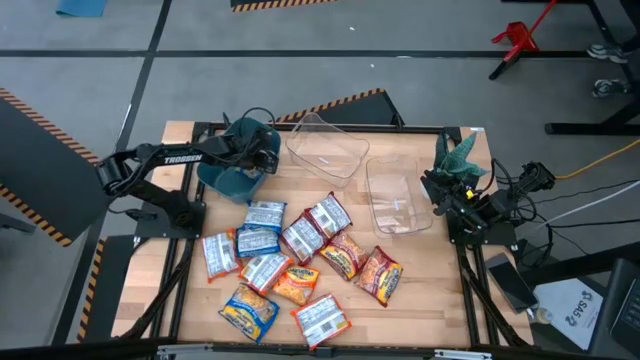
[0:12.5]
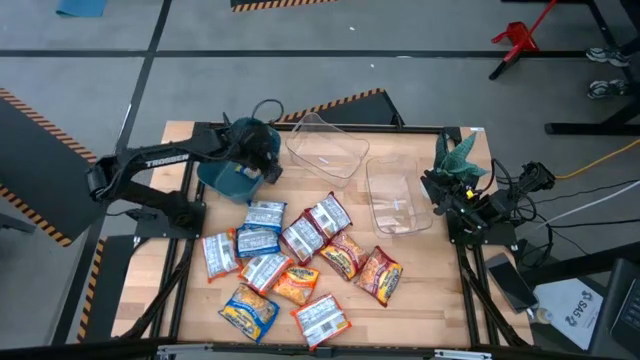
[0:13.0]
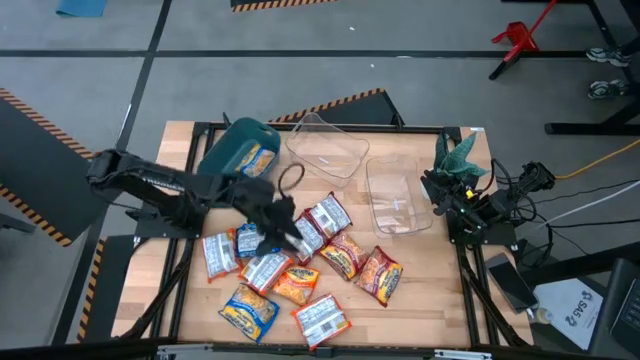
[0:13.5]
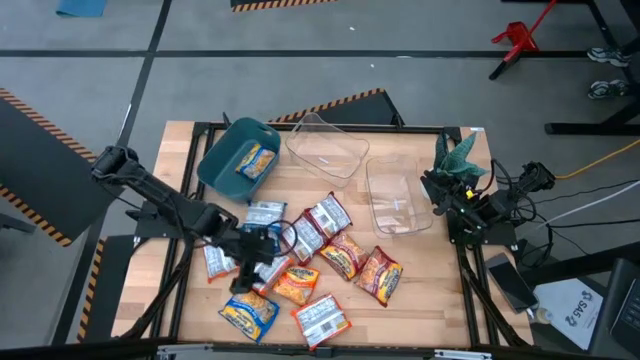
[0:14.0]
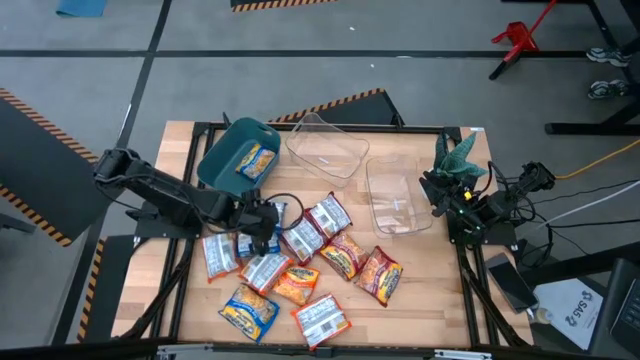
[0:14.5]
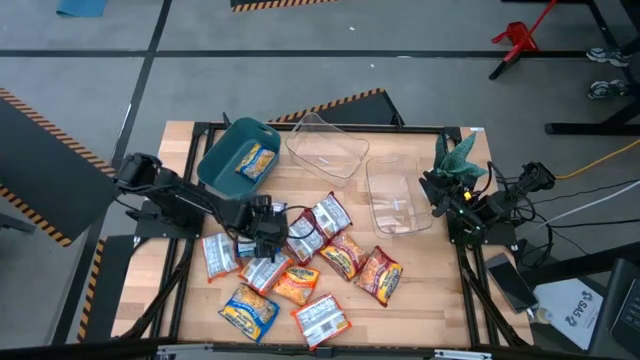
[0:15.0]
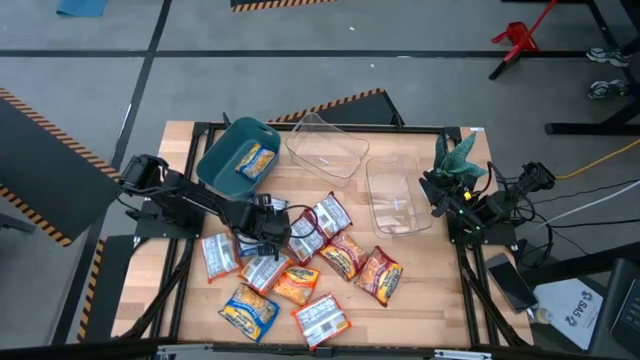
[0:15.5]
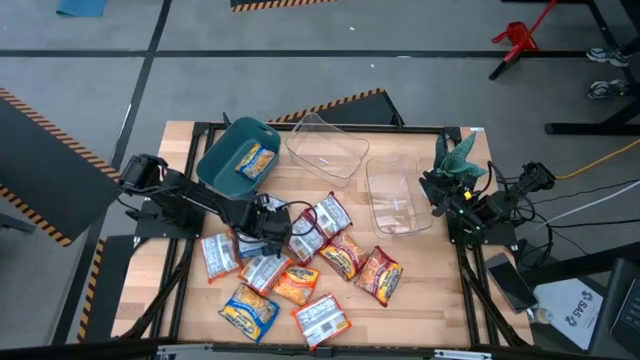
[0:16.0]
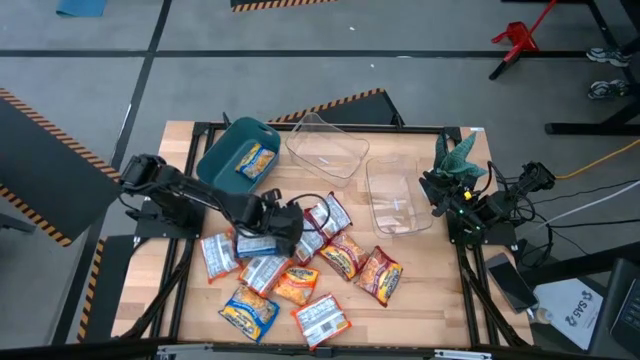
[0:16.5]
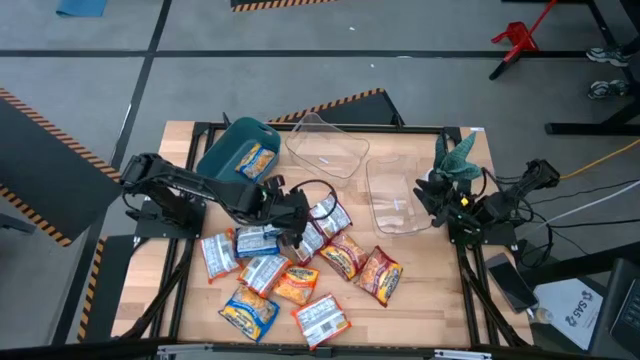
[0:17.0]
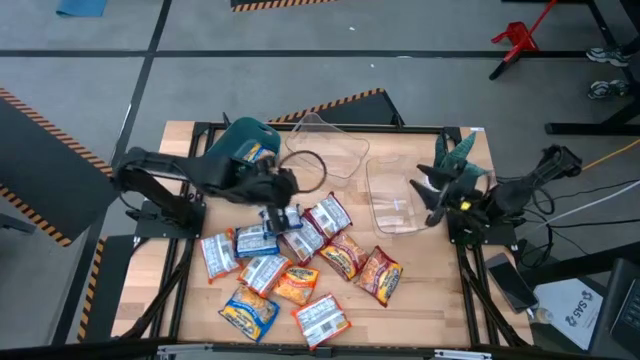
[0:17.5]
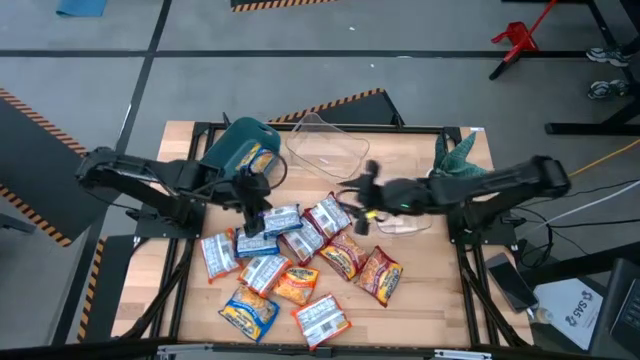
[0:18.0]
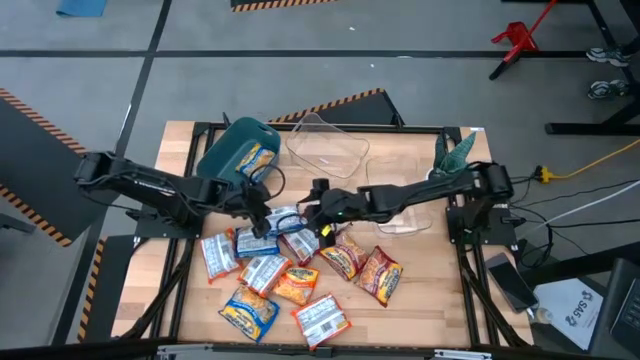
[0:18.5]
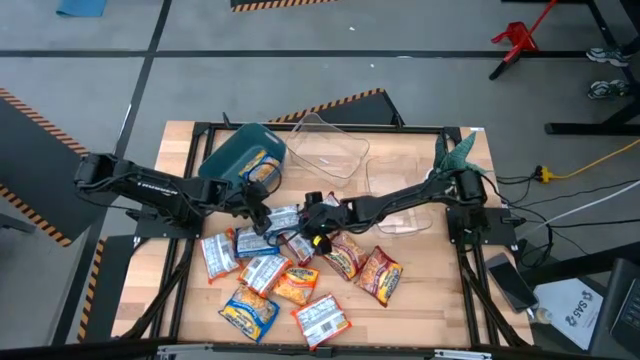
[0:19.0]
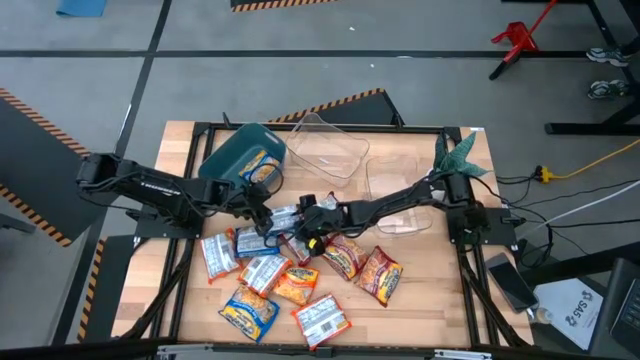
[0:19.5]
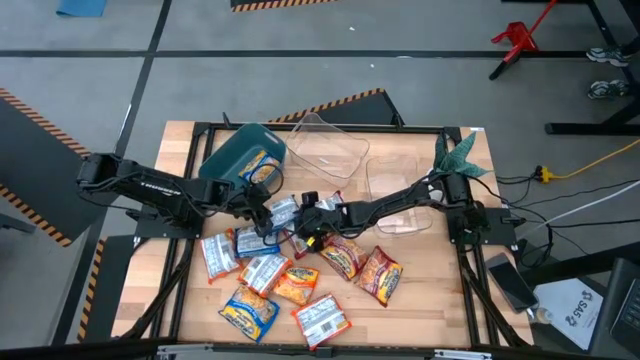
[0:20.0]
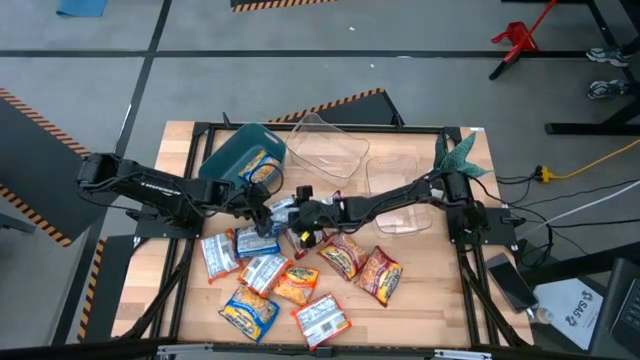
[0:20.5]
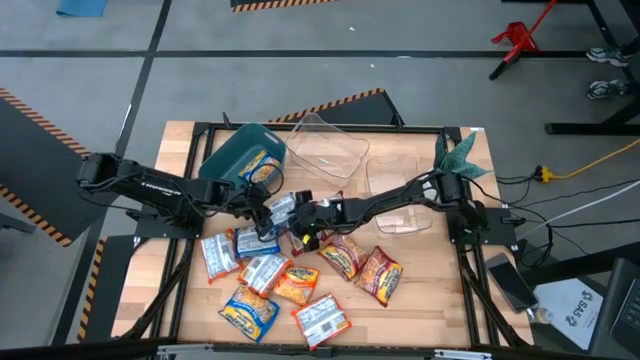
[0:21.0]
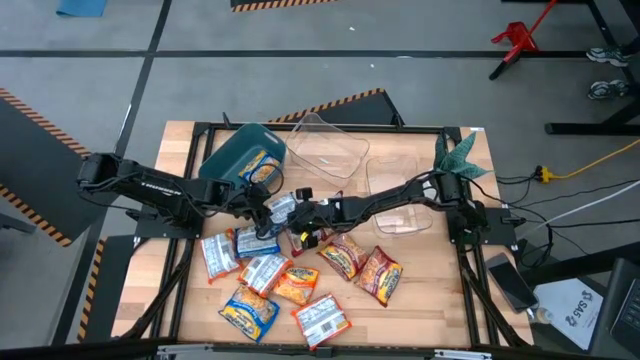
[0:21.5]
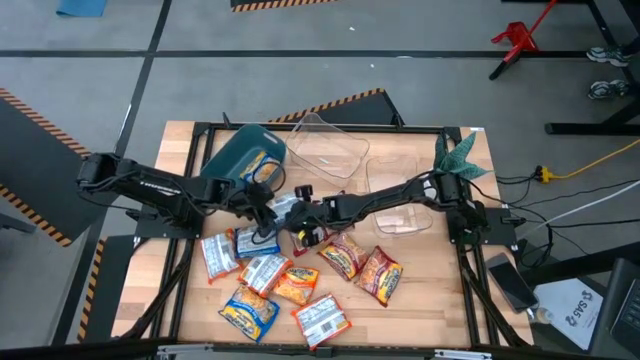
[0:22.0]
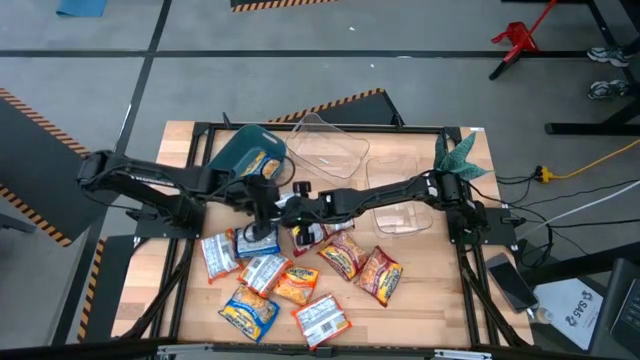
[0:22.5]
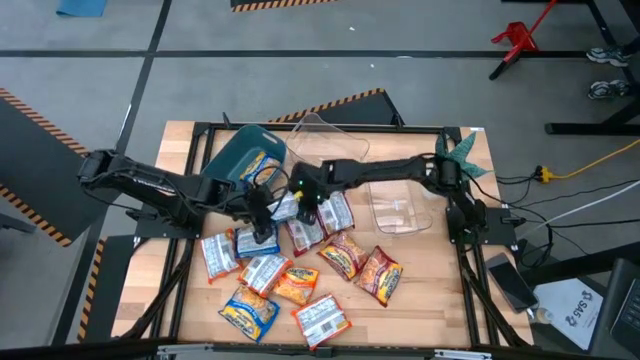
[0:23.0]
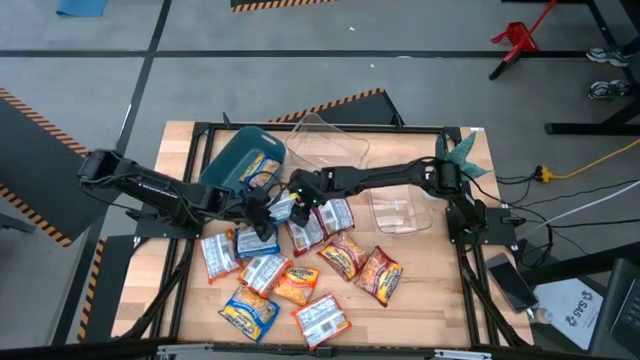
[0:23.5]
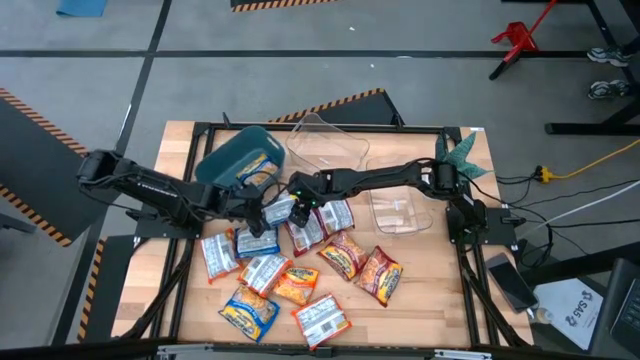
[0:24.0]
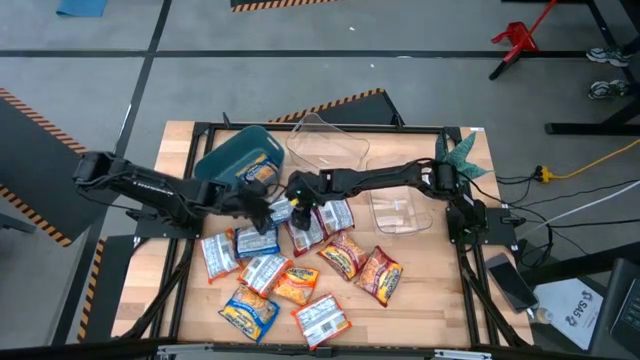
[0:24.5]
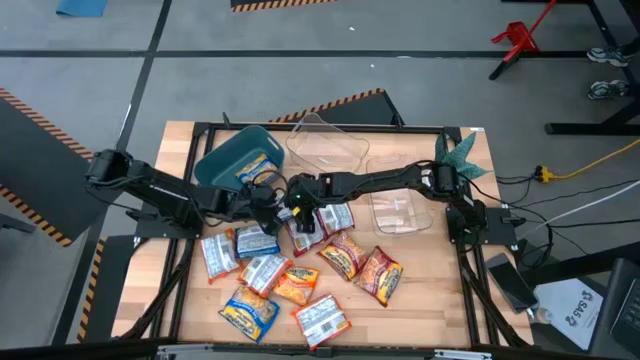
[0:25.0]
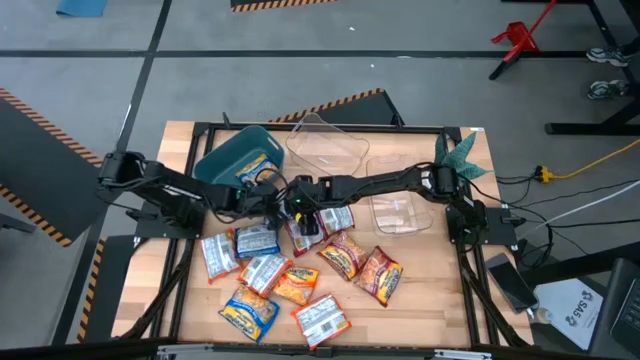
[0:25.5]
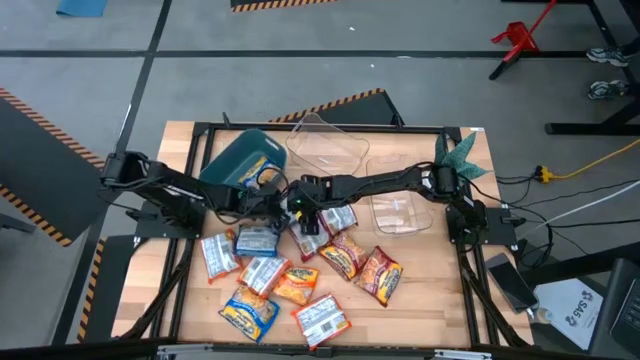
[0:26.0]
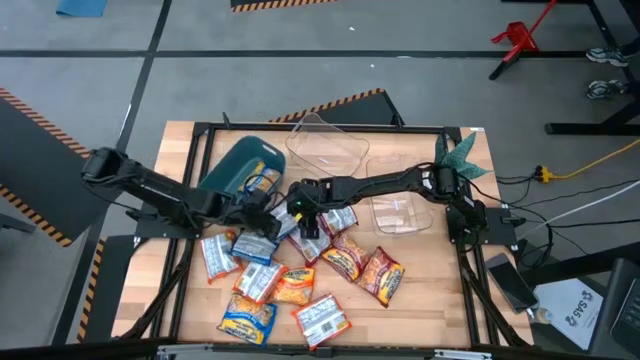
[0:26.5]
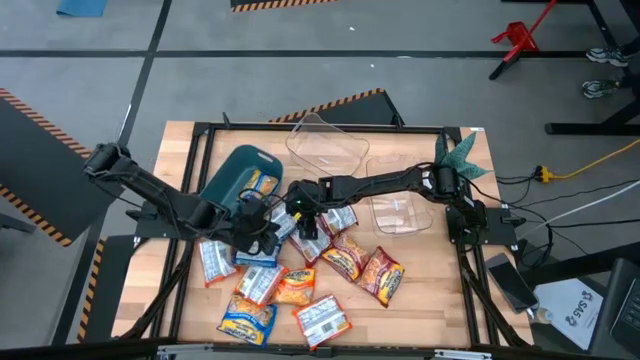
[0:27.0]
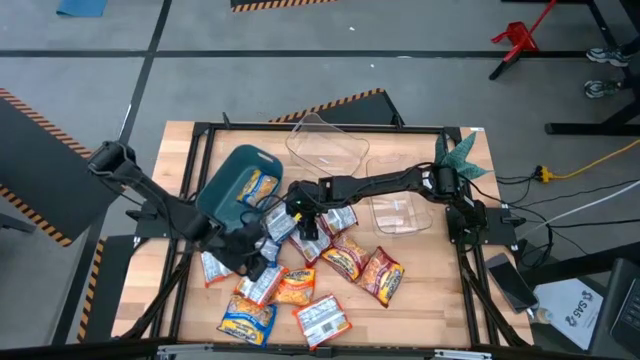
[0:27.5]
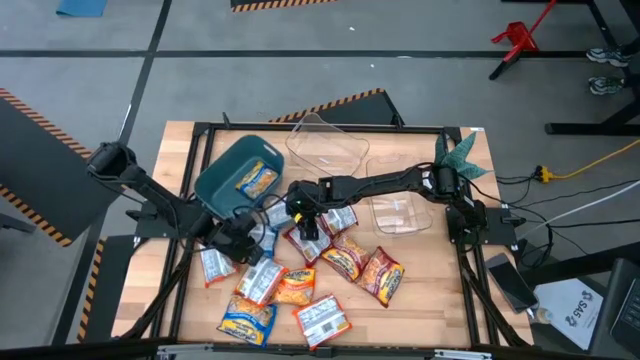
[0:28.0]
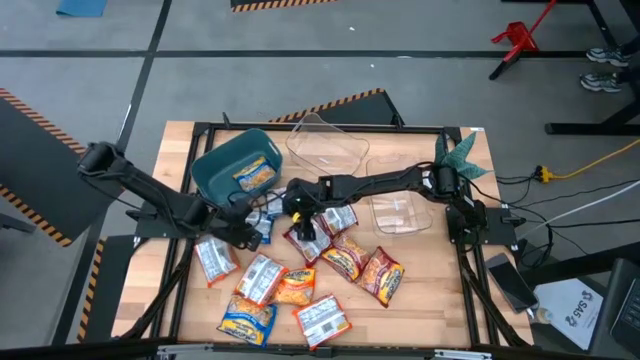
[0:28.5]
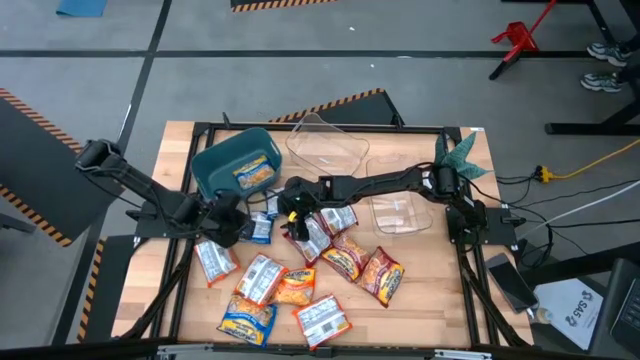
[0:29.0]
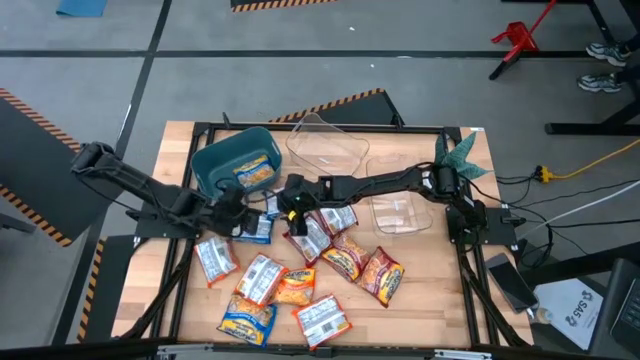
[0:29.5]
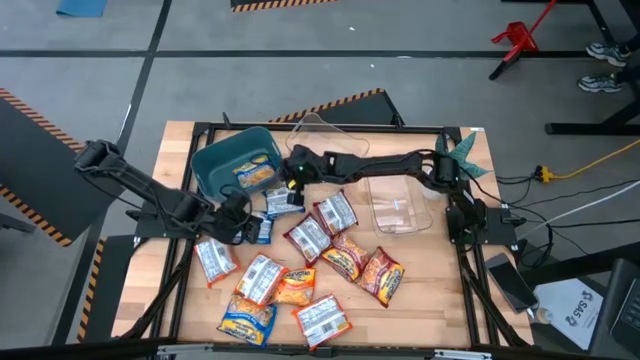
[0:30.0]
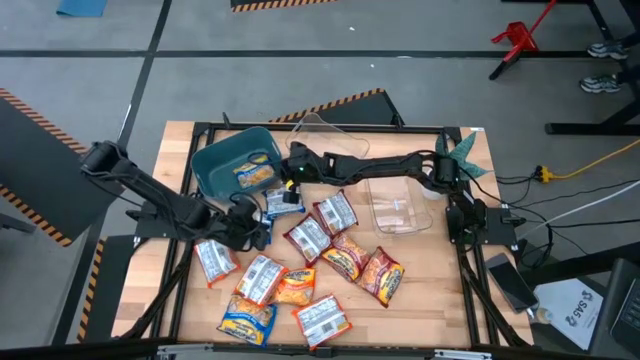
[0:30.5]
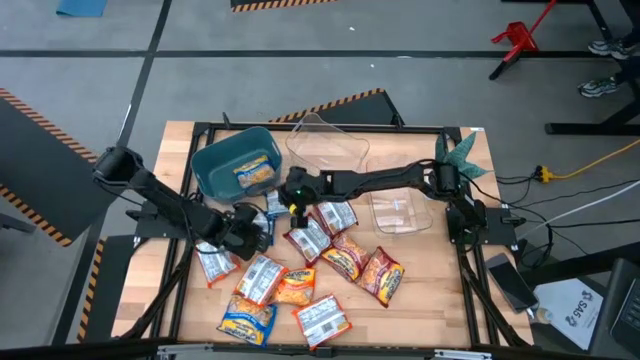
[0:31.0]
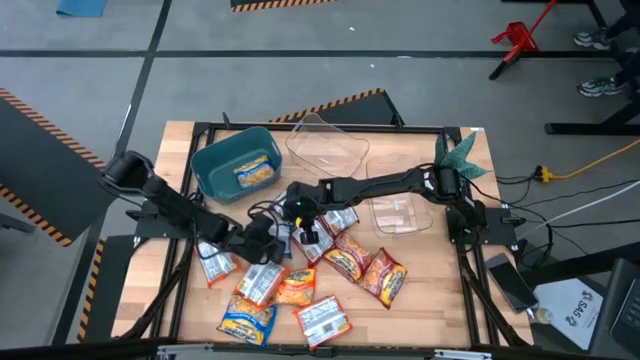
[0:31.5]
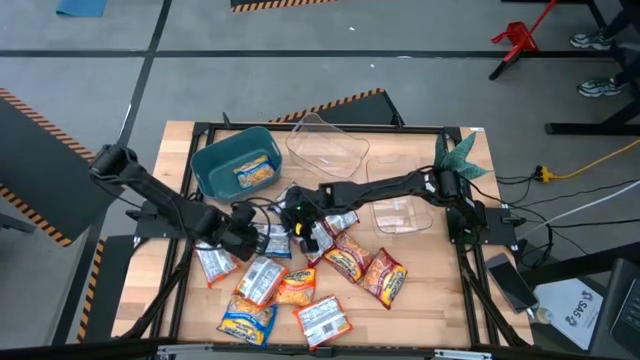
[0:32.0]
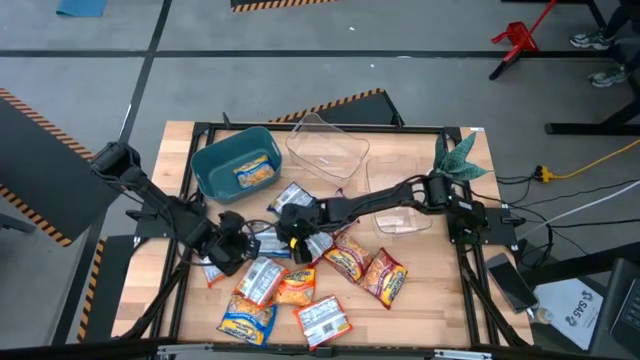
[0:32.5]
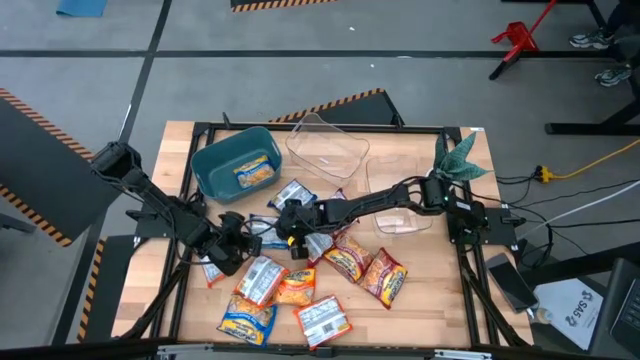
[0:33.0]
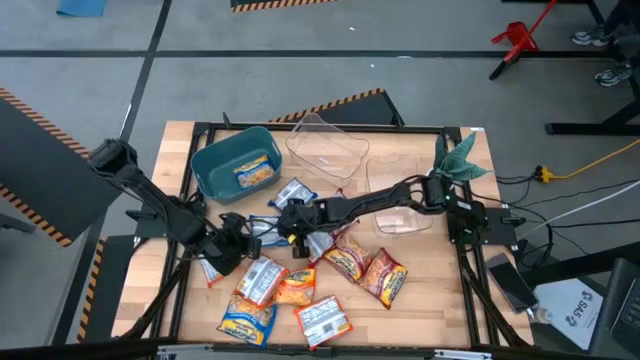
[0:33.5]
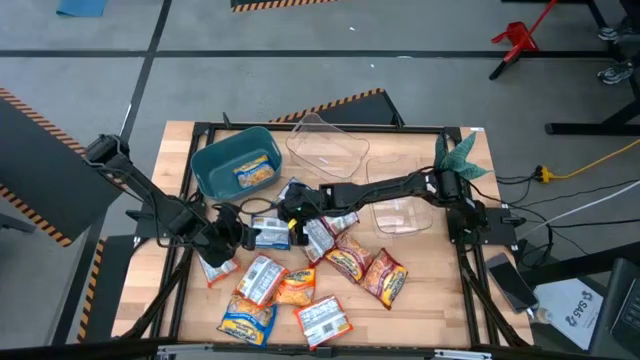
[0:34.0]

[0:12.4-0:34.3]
Task: Sort Maruchan noodles
Put the blue noodle pack into the blue bin
